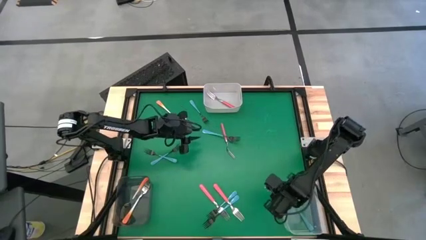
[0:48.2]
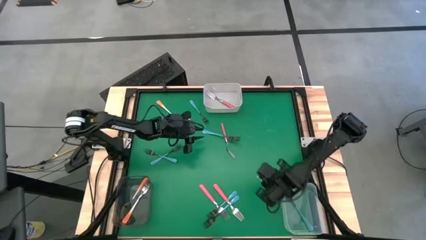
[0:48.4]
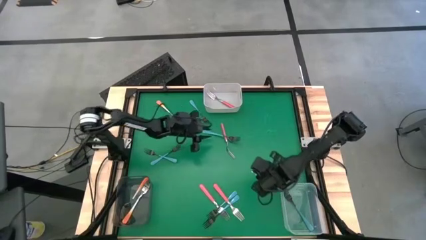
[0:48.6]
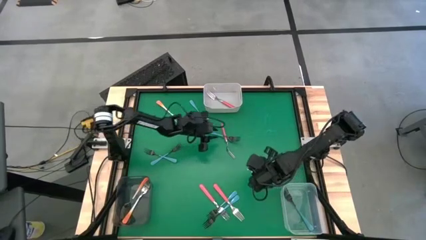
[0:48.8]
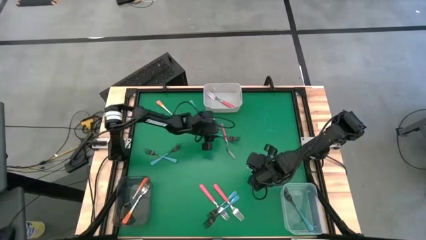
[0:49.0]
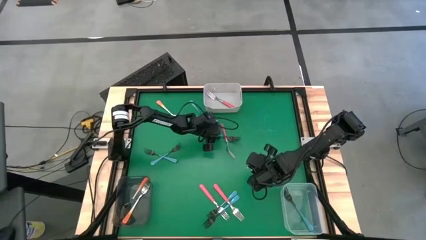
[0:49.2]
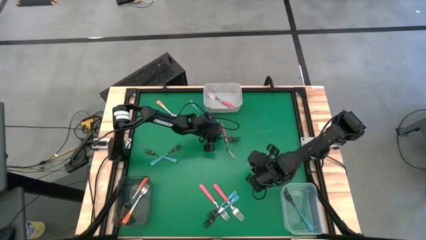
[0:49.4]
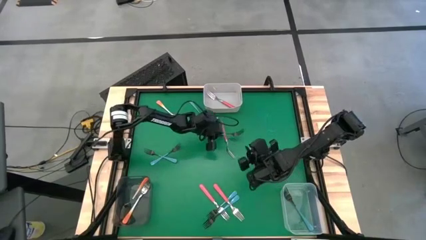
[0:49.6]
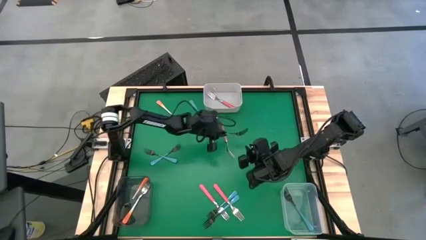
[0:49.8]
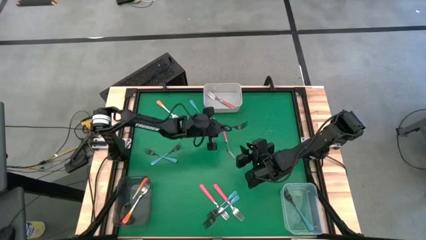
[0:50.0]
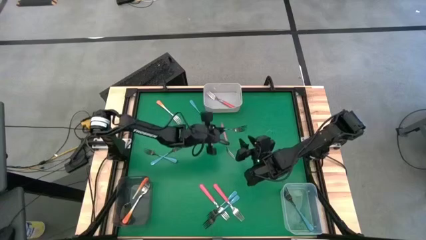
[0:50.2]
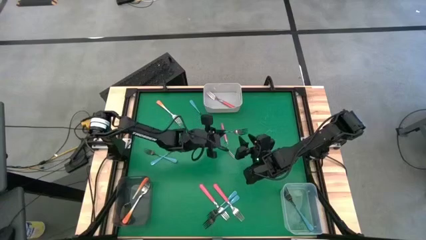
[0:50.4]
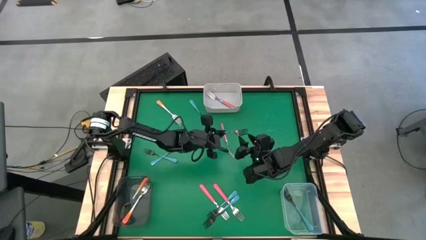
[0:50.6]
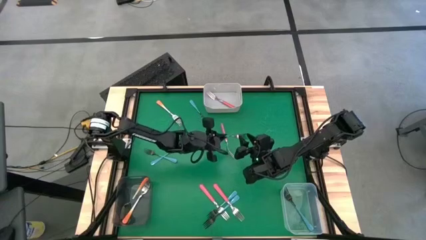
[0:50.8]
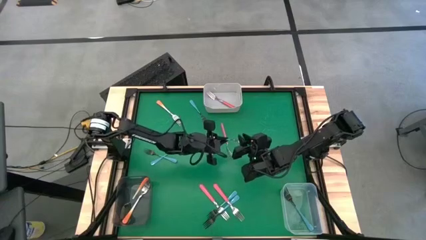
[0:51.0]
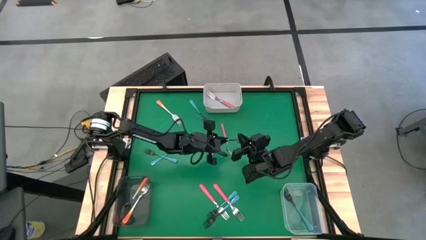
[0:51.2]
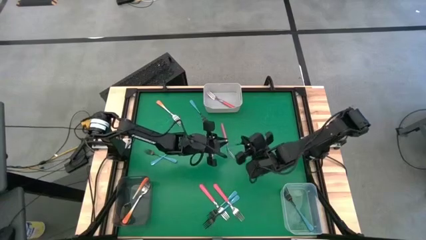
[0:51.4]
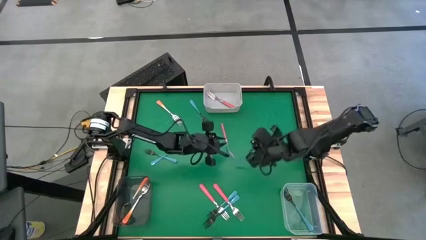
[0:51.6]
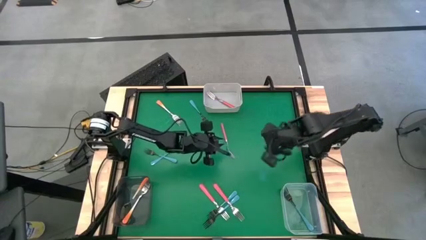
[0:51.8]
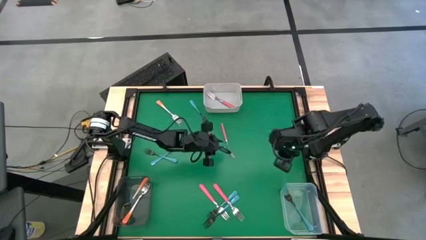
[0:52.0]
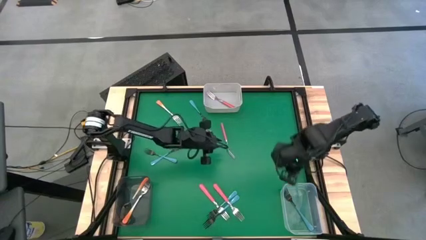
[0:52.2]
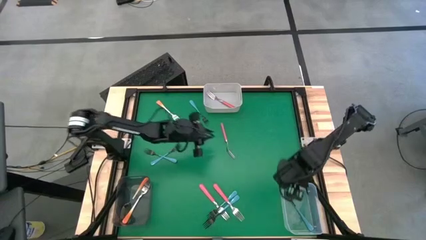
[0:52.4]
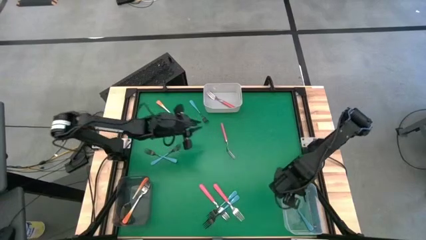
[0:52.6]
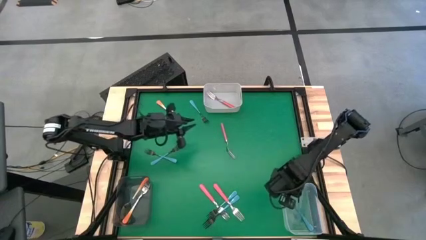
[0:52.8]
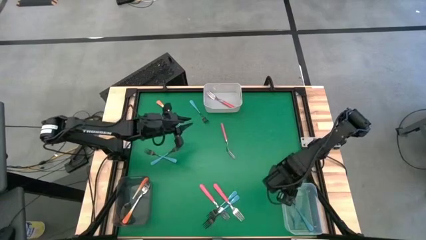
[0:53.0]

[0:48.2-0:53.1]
Task: Sort silverware by color (type)
Put the blue fork into the transparent bin

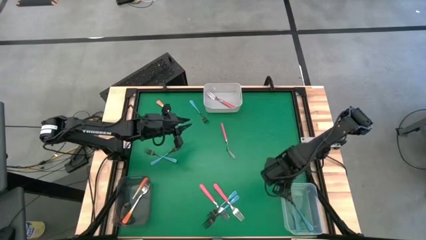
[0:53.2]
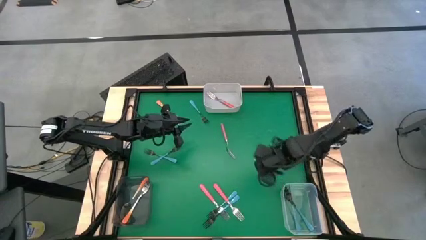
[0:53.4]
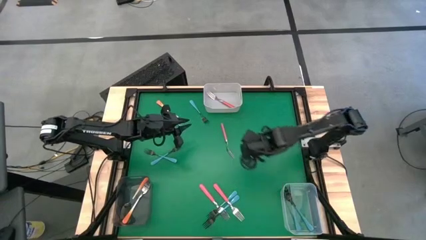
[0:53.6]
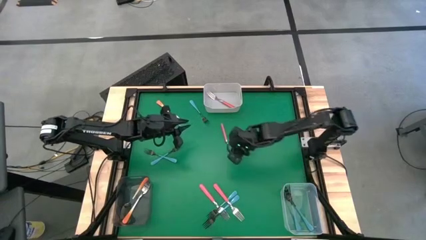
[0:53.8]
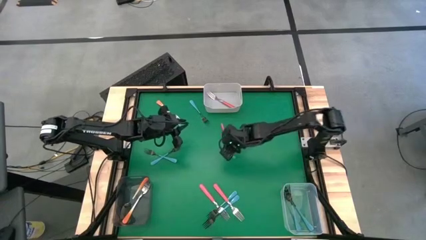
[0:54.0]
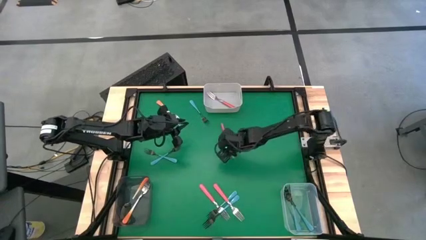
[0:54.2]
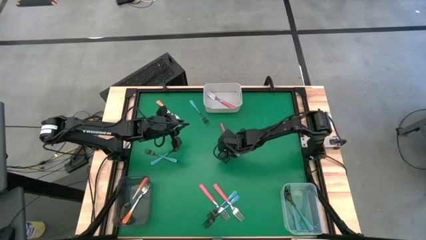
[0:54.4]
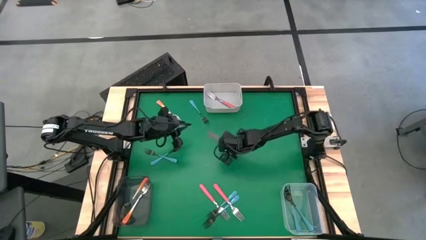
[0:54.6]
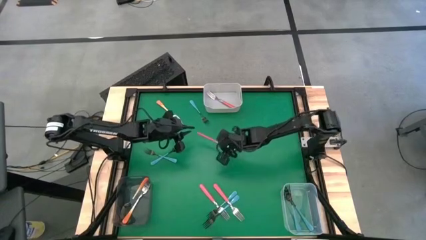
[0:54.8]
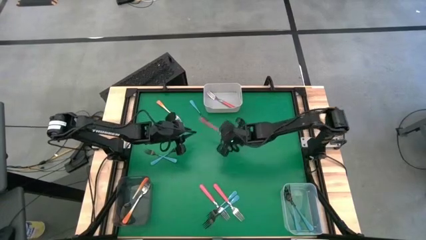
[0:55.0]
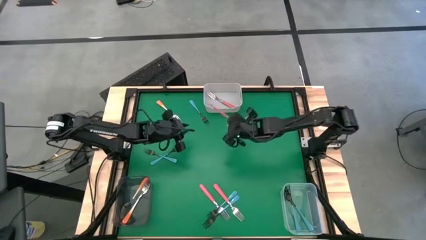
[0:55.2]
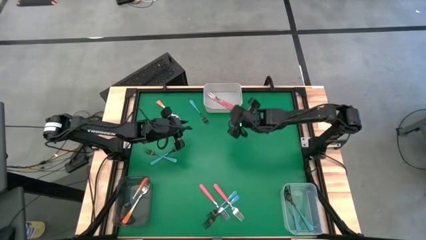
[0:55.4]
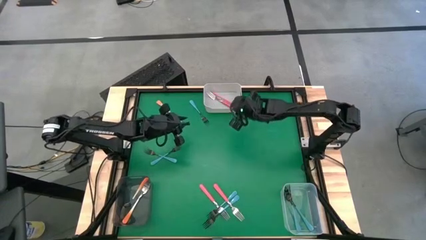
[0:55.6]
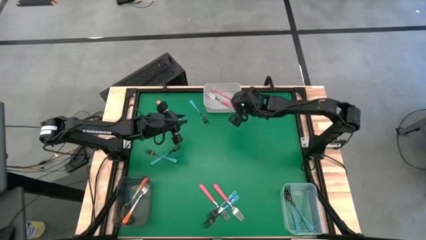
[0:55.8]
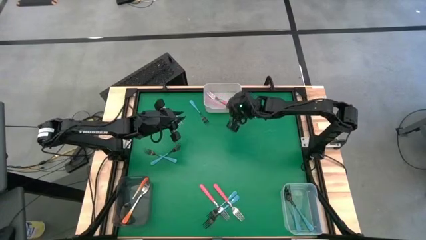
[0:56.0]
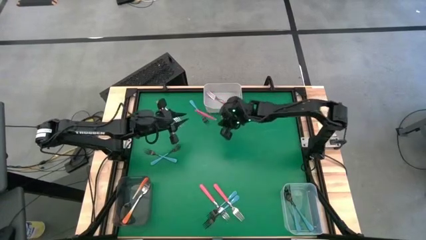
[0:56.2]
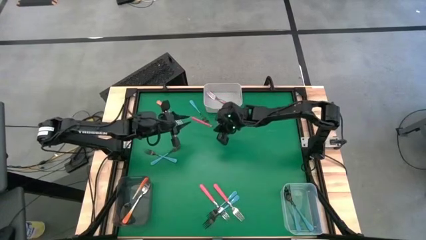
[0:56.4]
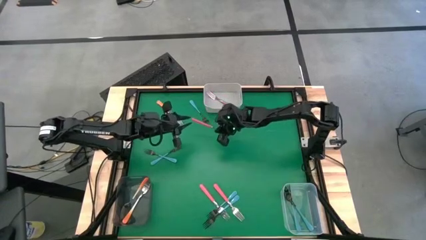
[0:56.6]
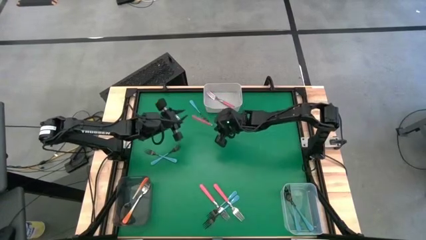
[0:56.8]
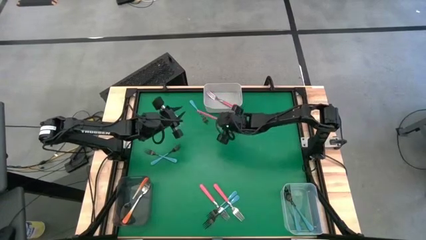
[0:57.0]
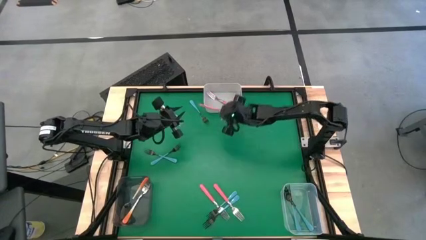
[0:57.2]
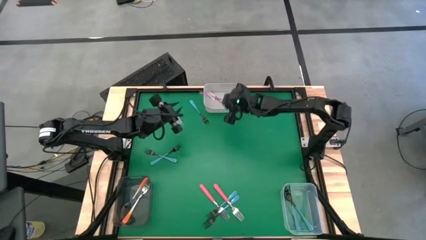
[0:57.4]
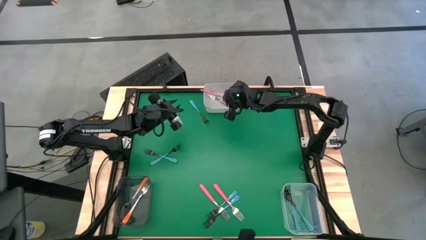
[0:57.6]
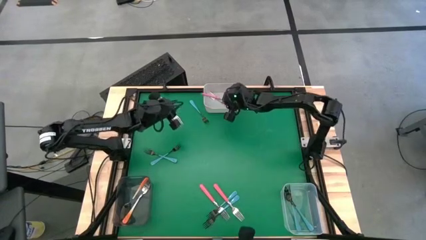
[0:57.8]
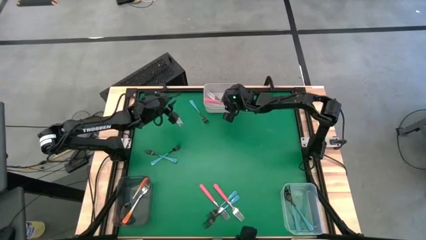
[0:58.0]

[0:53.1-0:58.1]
Put the pink fork into the white bin

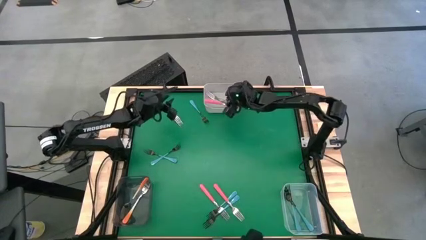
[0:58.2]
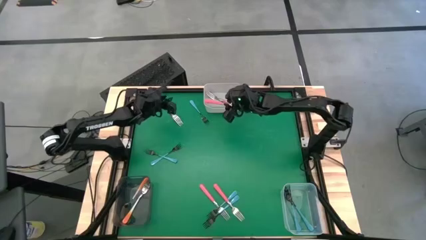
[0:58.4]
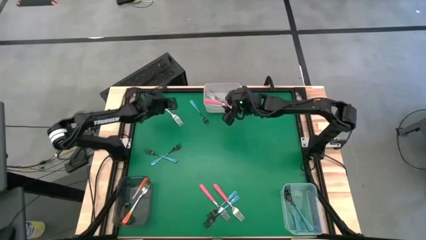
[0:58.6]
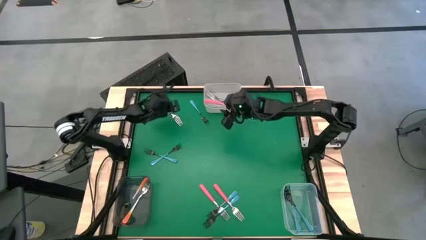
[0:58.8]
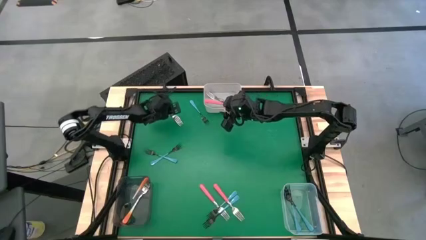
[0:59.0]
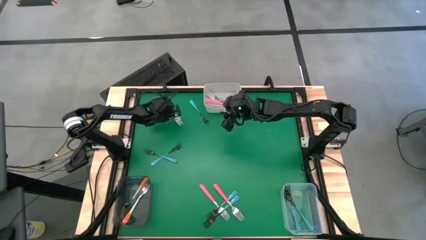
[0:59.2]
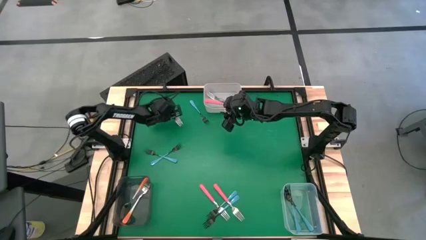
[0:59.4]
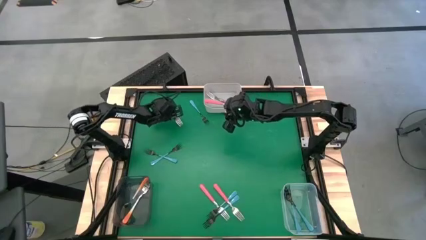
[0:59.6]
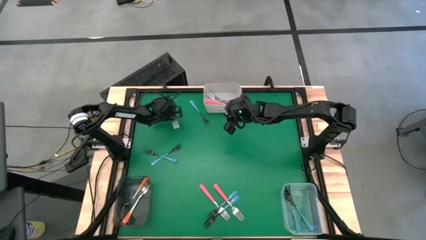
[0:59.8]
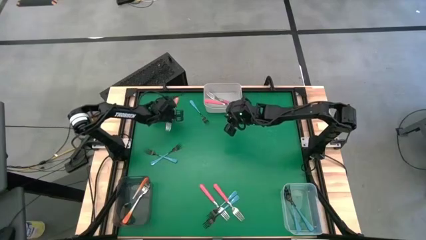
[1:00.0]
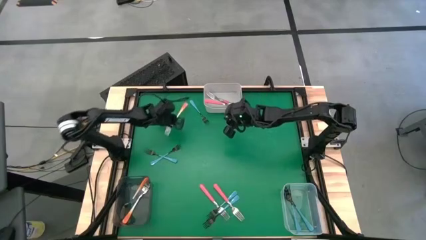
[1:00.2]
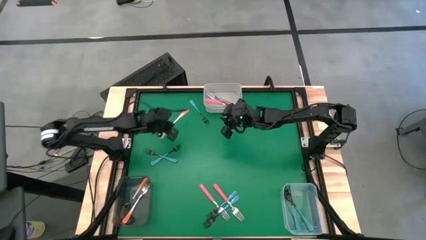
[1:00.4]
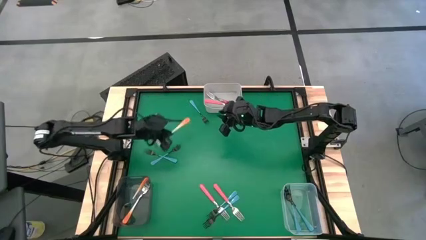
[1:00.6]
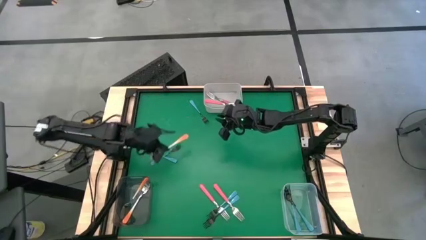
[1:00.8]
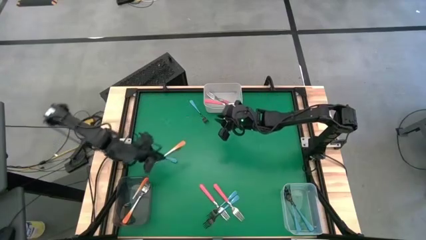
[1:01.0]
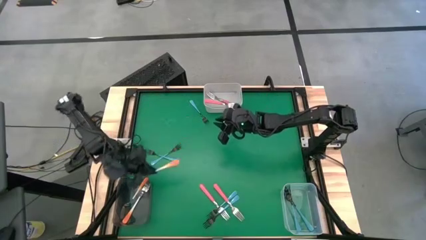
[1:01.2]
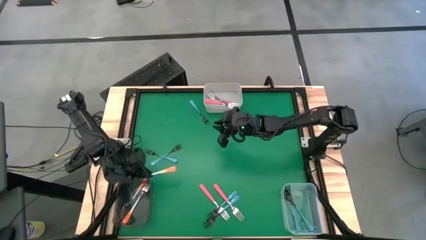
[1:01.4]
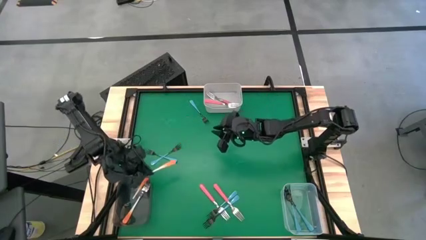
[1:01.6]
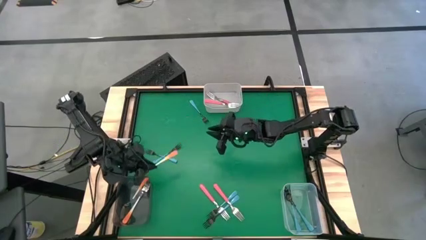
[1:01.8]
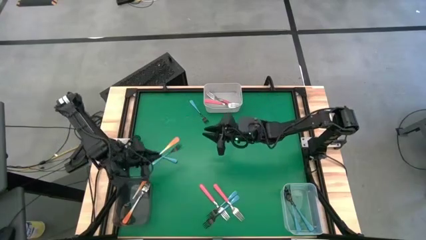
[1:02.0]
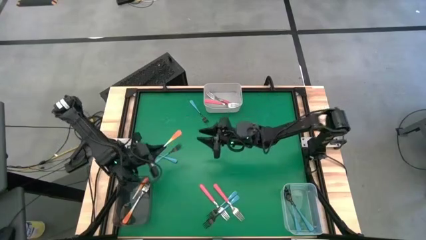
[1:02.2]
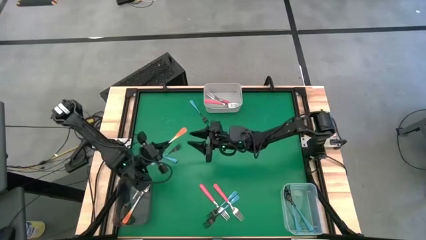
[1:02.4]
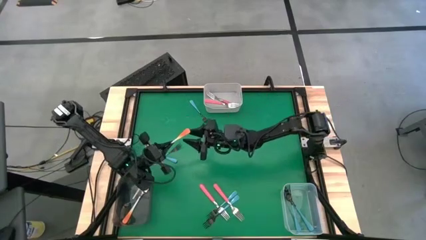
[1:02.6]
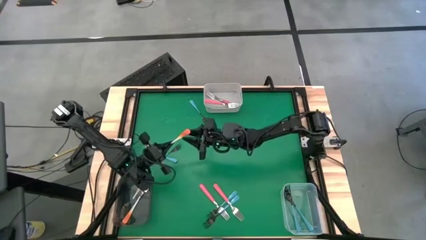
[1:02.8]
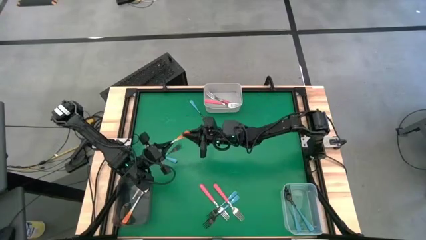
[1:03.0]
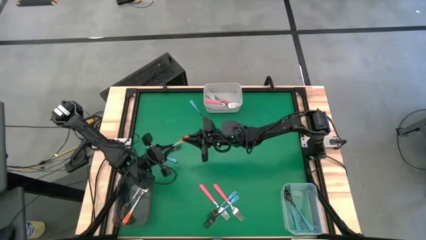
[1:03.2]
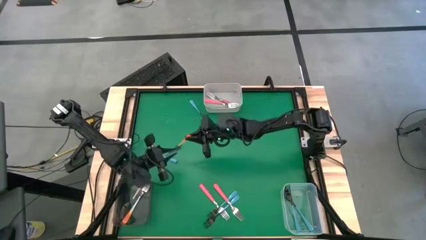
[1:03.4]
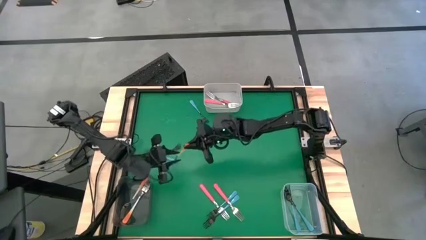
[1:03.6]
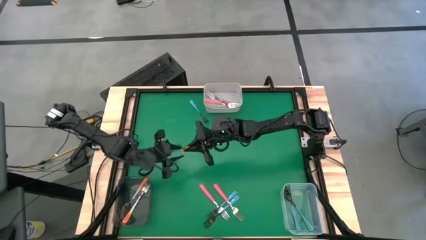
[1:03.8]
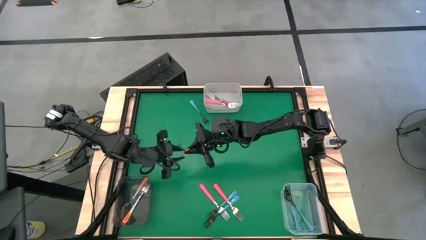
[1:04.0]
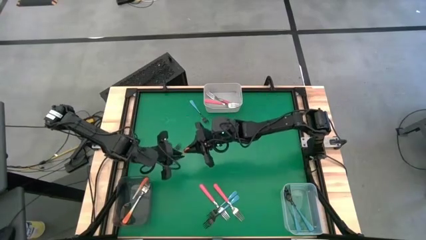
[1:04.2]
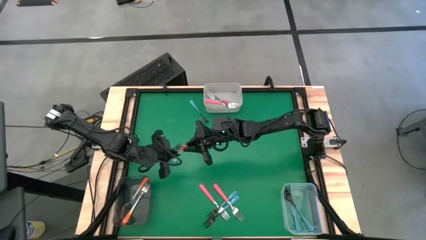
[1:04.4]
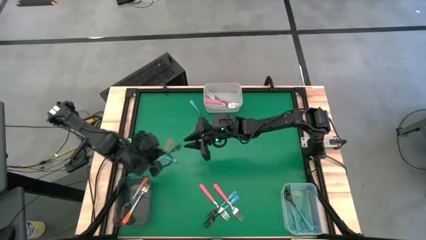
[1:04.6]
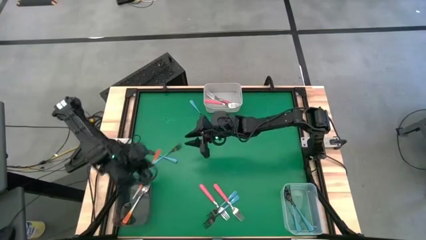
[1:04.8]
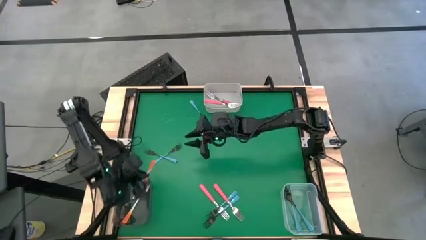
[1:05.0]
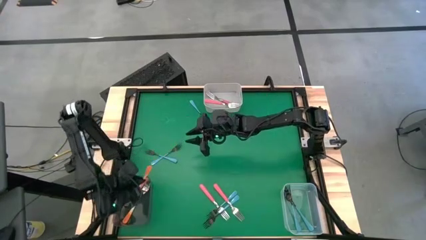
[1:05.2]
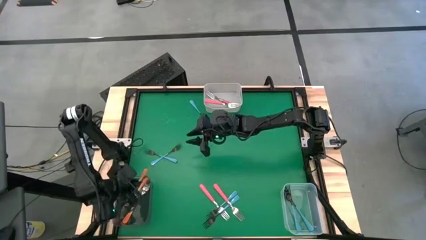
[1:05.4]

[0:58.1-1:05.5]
Put the orange fork into the black bin
